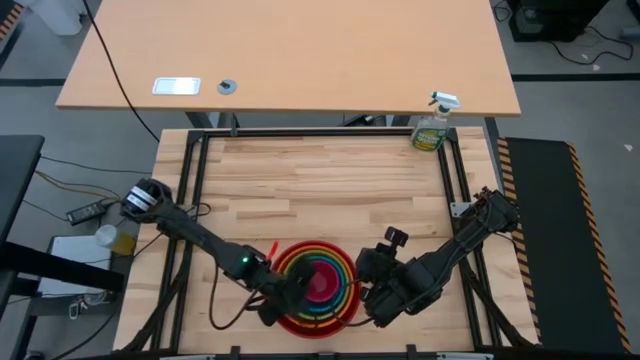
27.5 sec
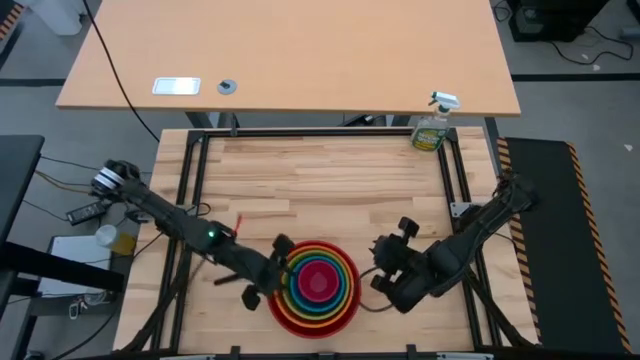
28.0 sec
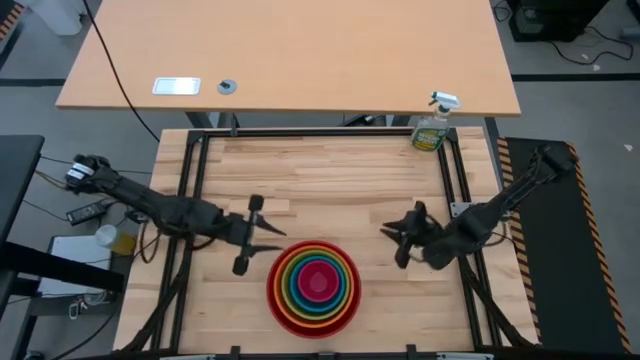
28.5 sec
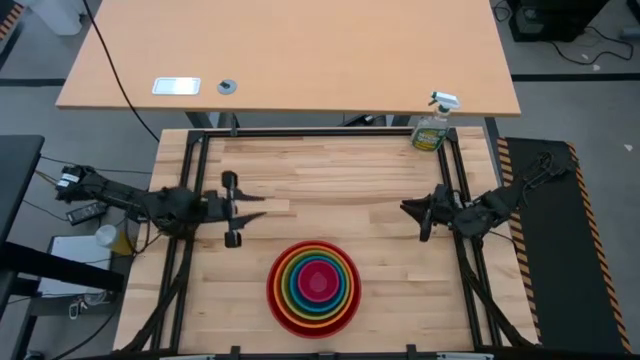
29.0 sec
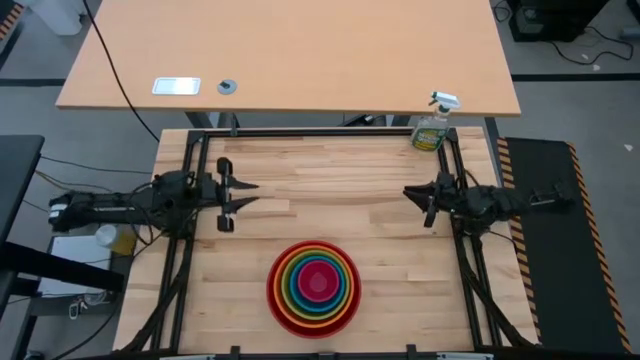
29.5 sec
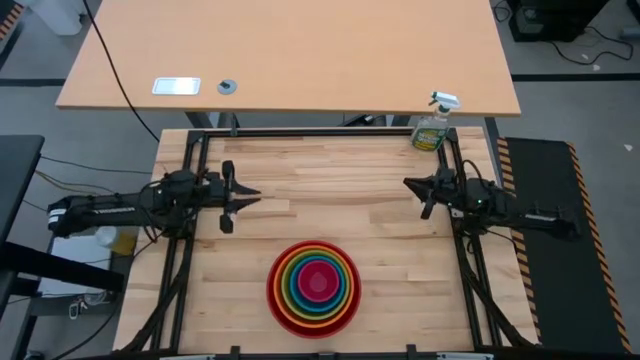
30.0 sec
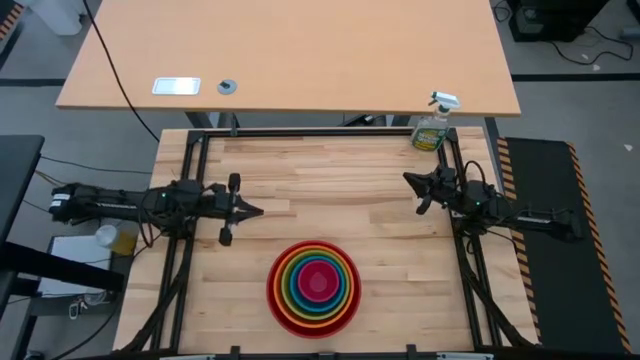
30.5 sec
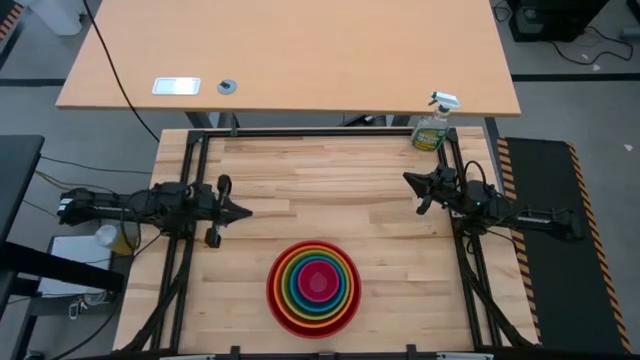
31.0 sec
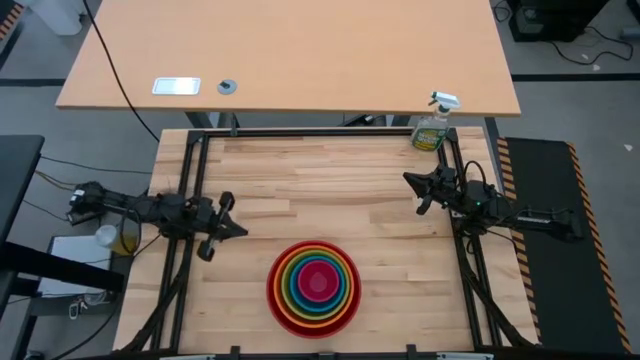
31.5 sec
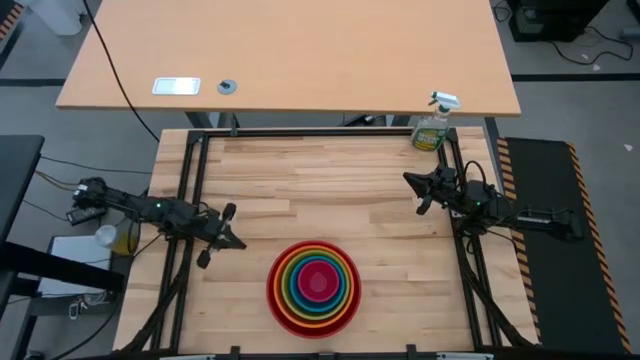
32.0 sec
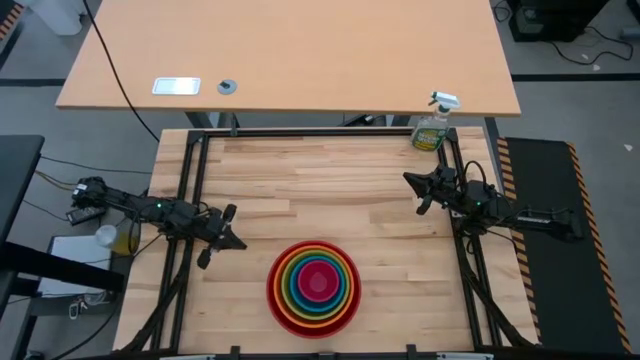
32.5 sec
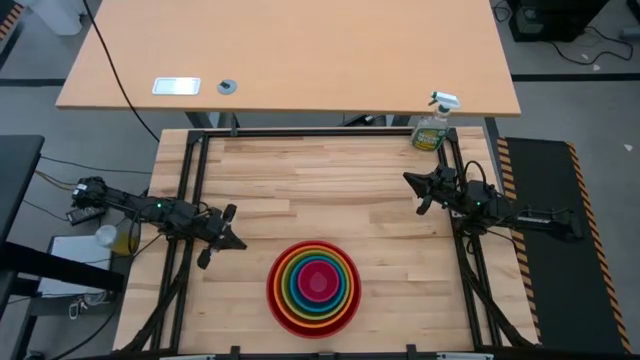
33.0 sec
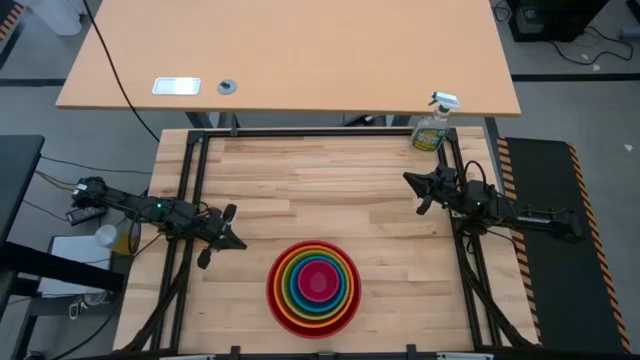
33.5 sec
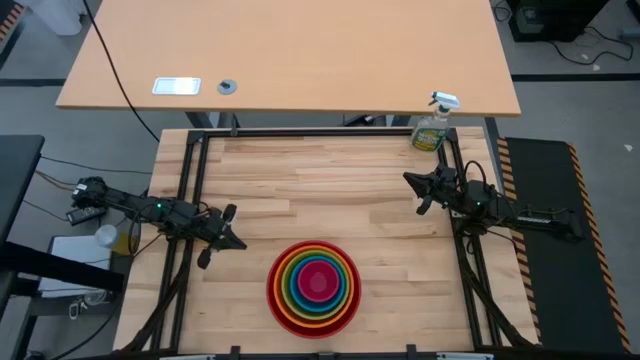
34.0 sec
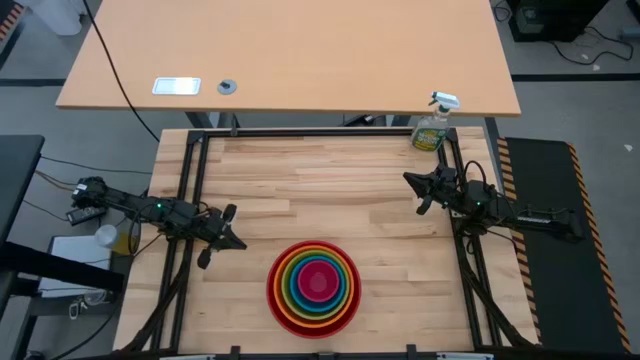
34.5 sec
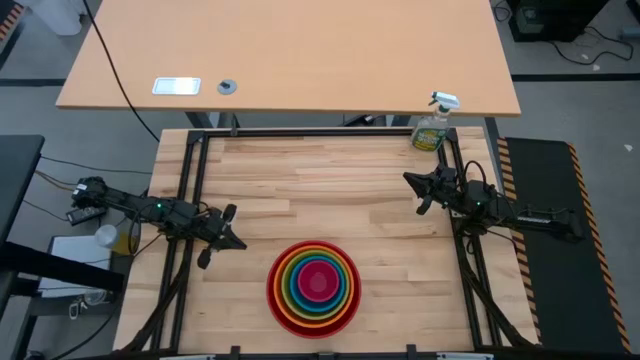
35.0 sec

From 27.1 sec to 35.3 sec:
Return to Home Position

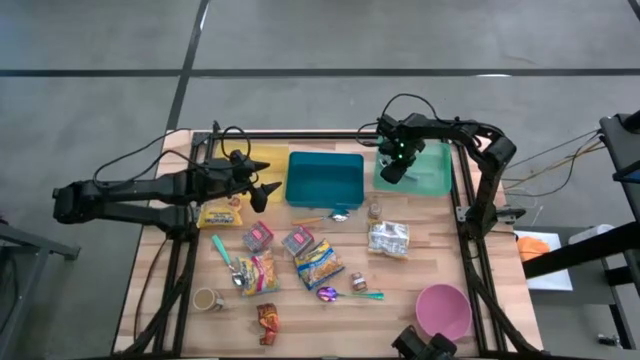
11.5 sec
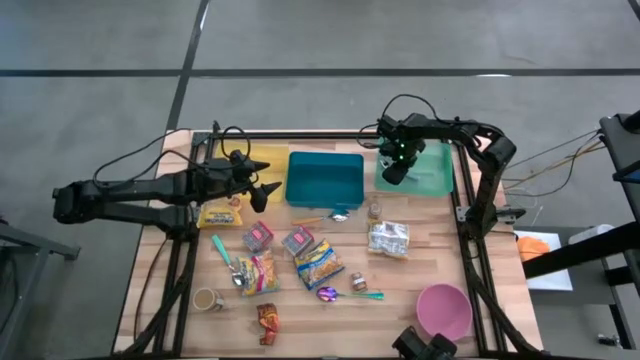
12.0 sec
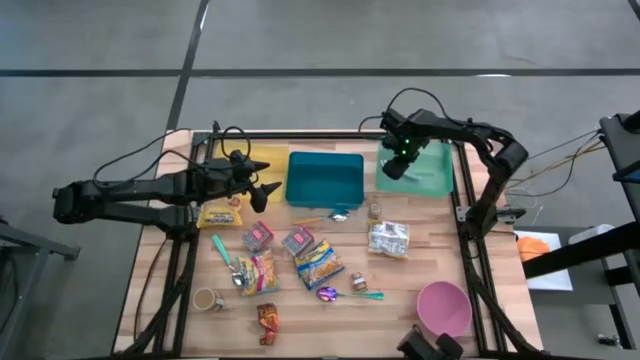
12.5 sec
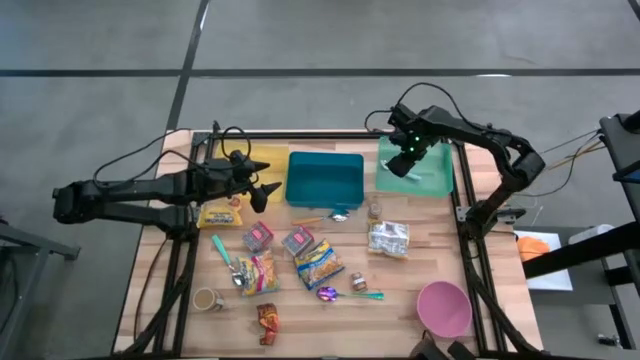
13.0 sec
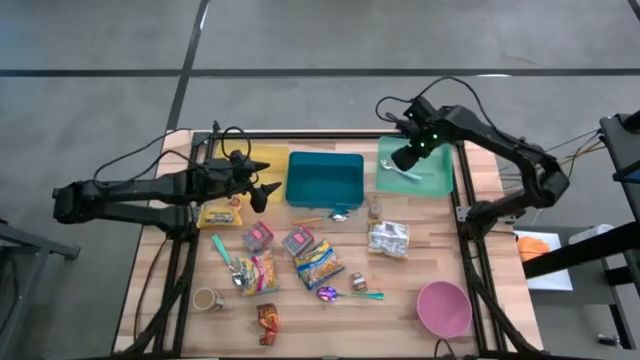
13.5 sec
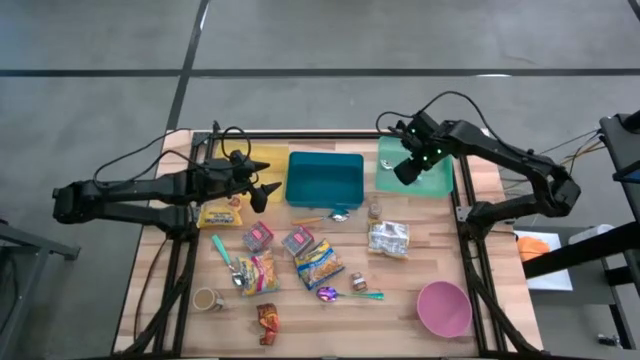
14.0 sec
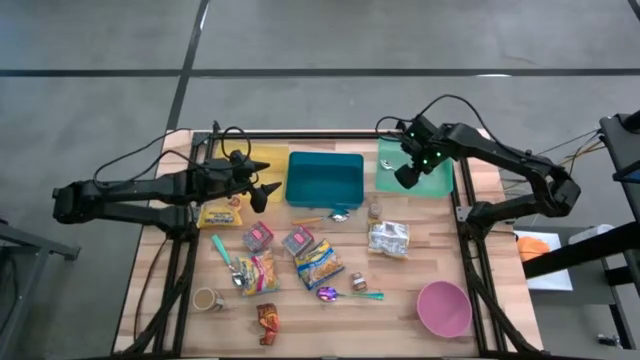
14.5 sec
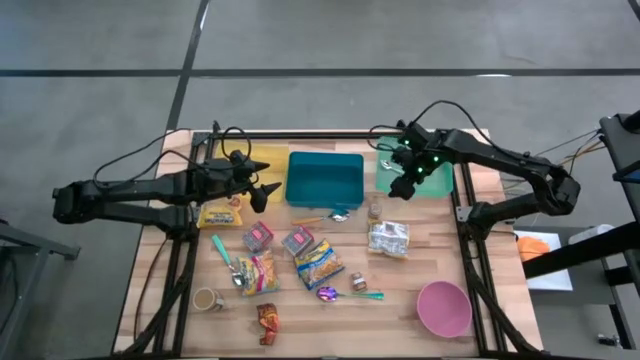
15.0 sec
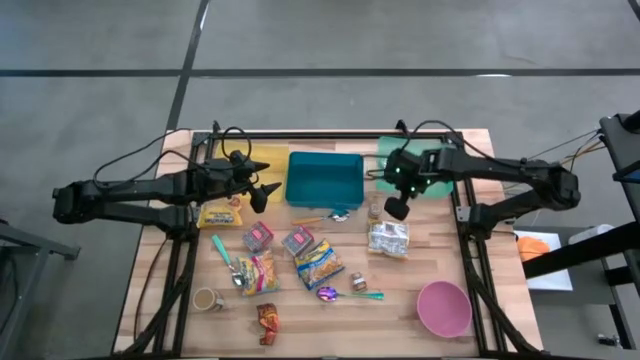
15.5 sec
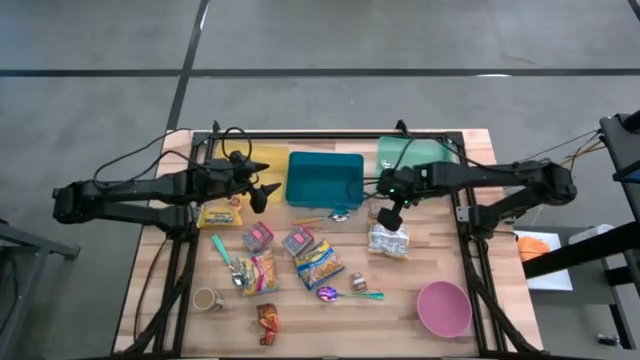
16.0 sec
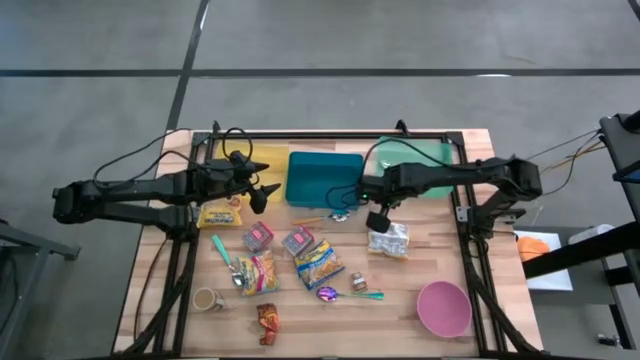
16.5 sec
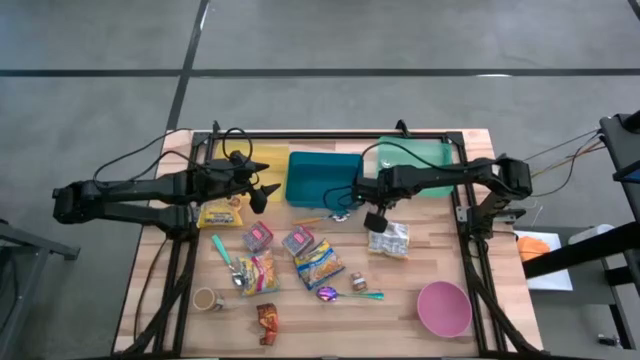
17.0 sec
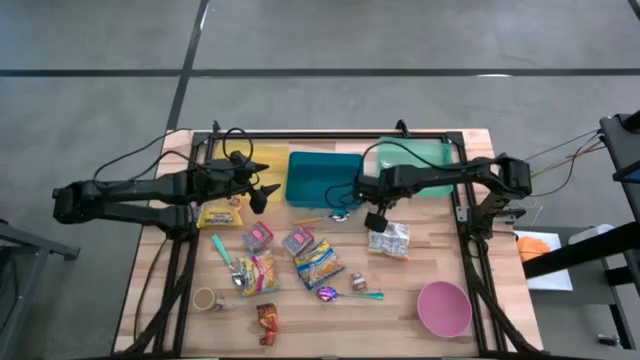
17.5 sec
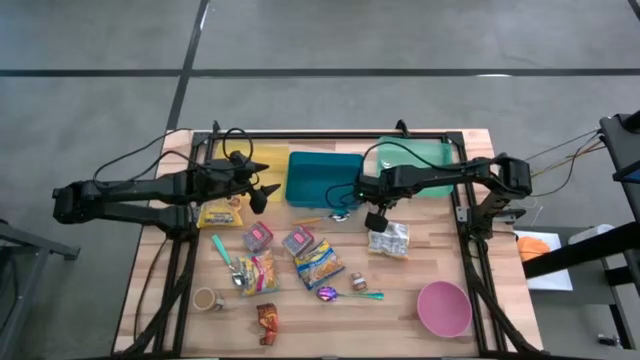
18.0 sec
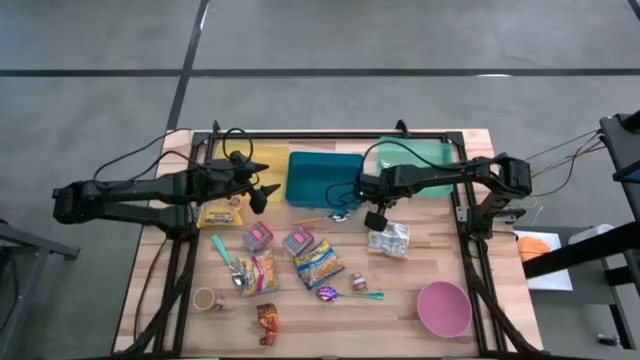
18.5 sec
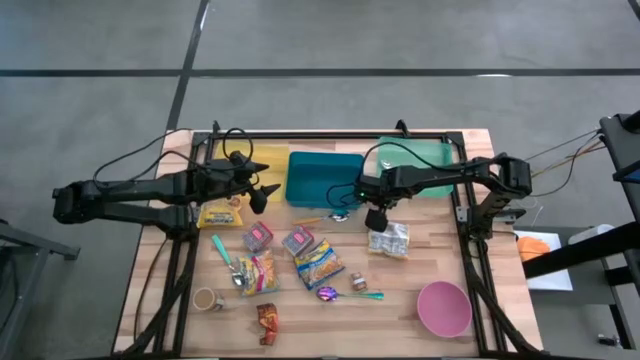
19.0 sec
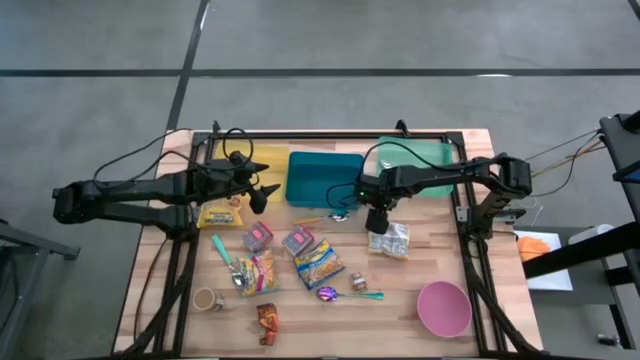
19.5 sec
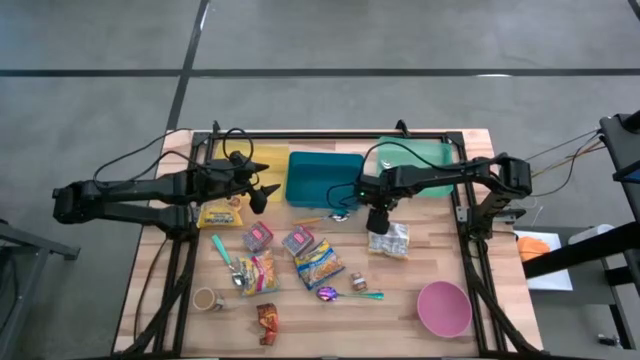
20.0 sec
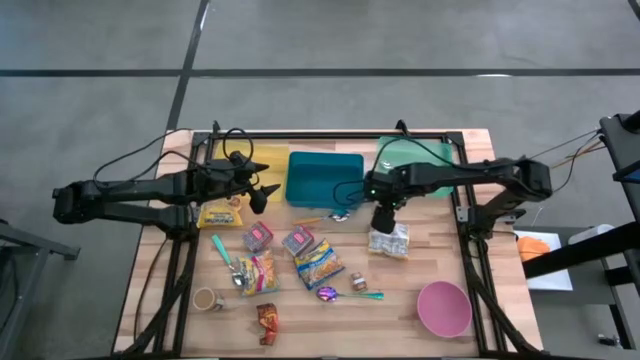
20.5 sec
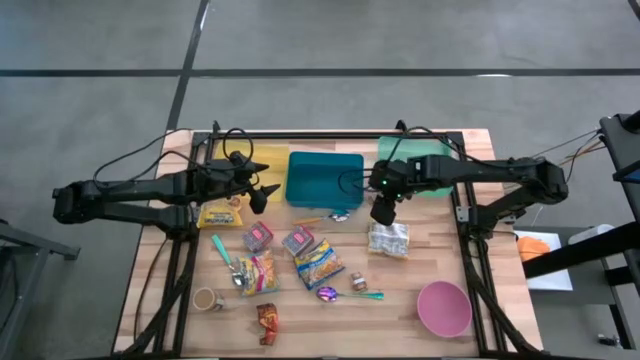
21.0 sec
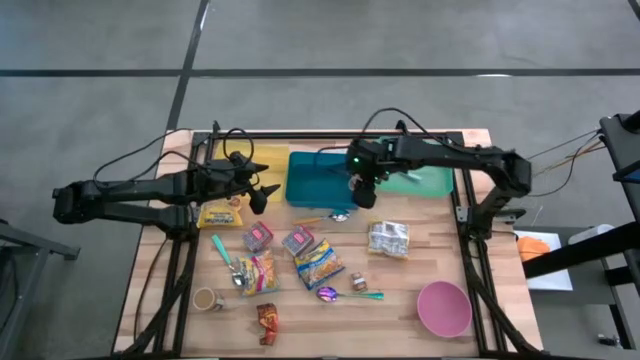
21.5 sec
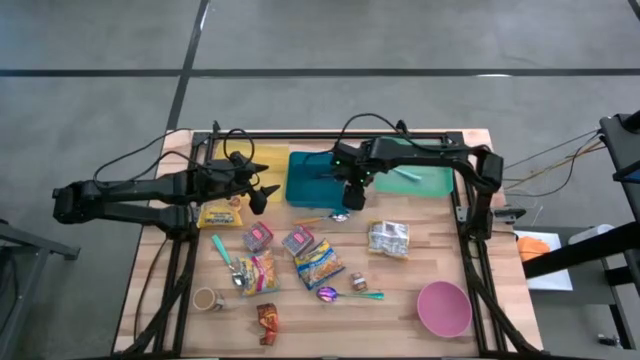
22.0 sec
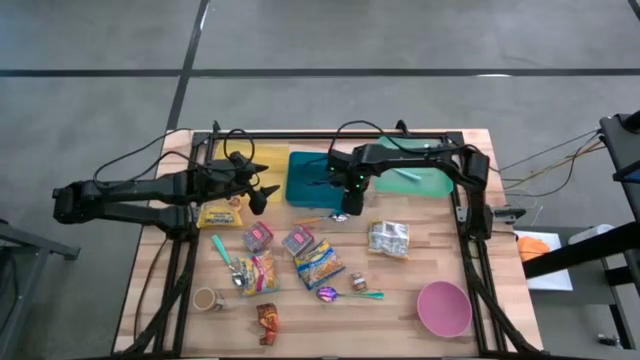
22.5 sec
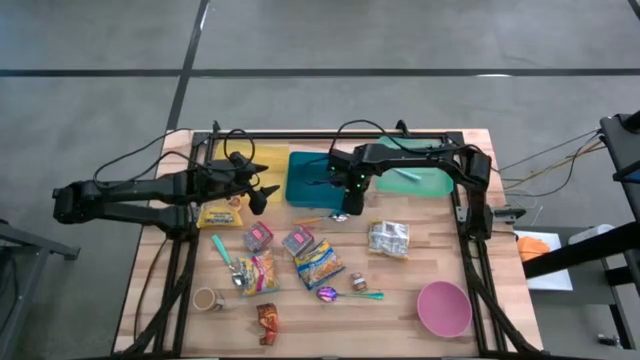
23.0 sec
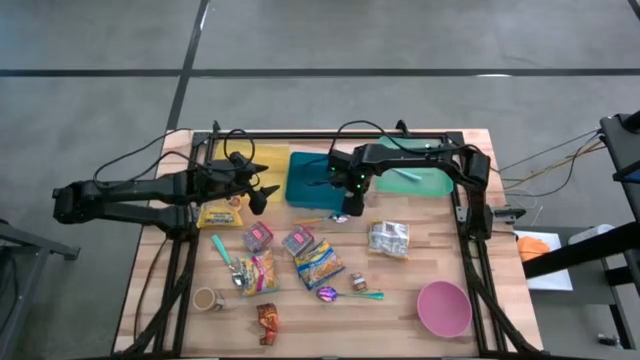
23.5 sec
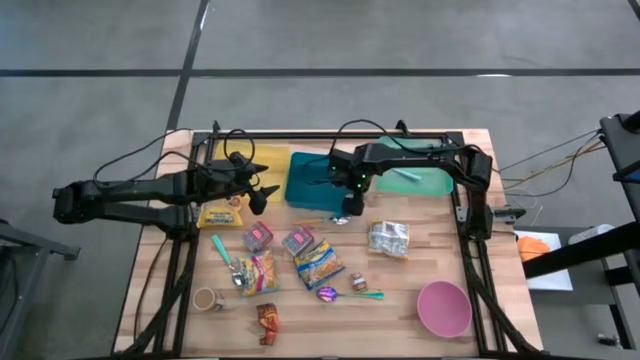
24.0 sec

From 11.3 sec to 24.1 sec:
Put the top brown seasoning bottle into the blue bin
